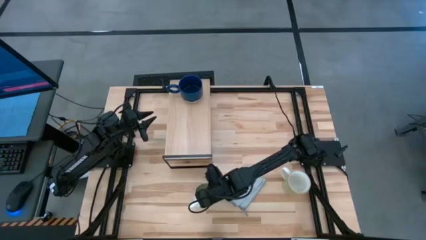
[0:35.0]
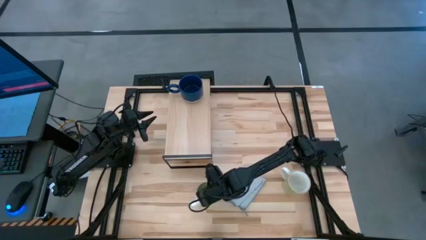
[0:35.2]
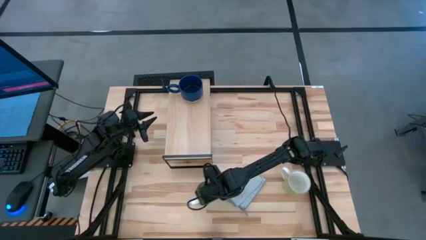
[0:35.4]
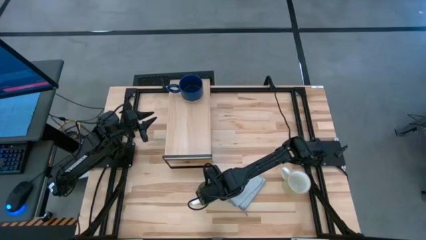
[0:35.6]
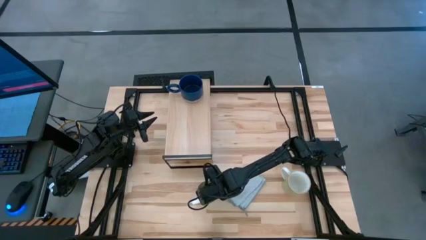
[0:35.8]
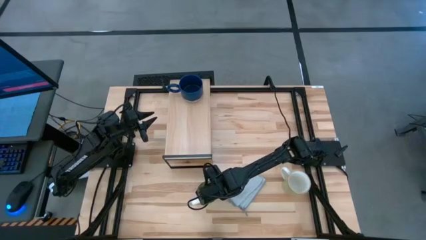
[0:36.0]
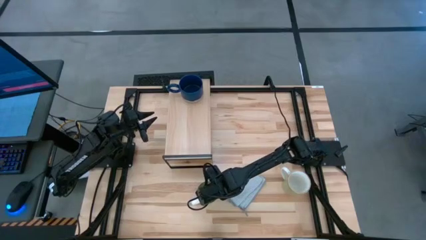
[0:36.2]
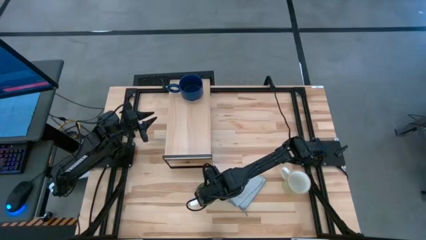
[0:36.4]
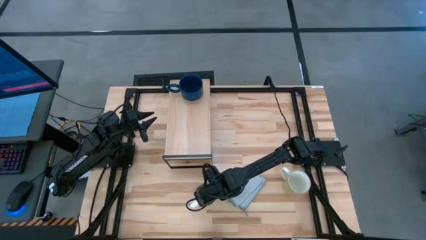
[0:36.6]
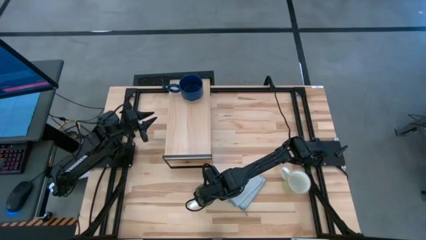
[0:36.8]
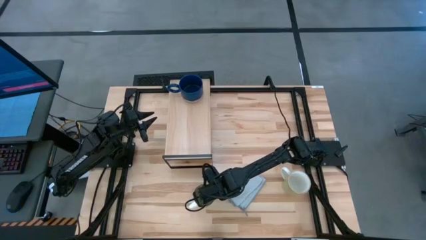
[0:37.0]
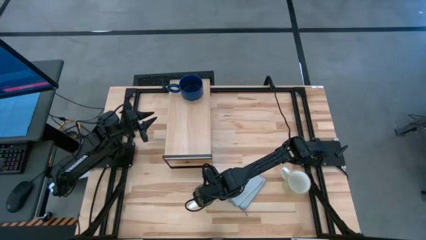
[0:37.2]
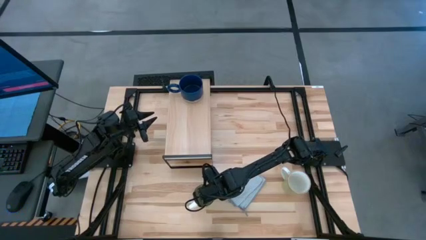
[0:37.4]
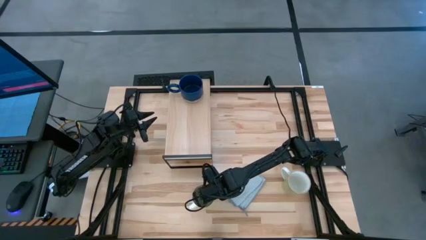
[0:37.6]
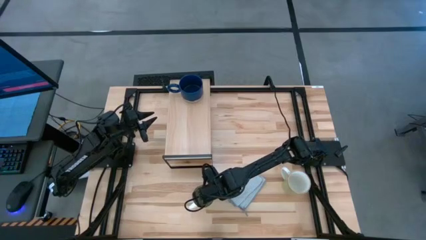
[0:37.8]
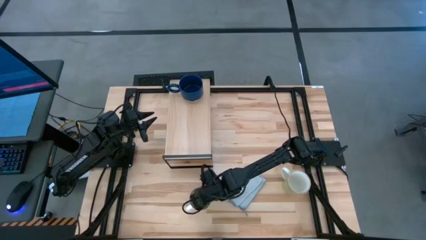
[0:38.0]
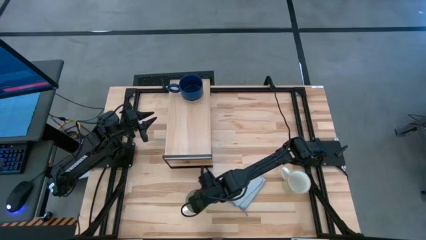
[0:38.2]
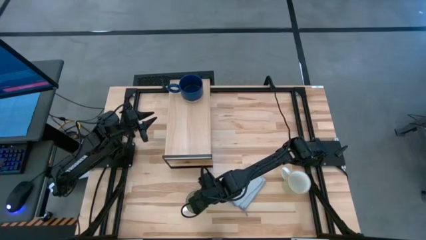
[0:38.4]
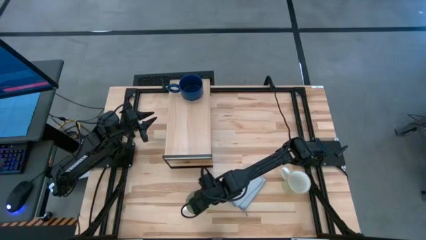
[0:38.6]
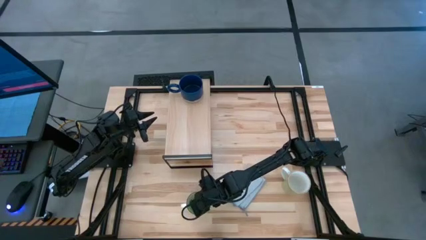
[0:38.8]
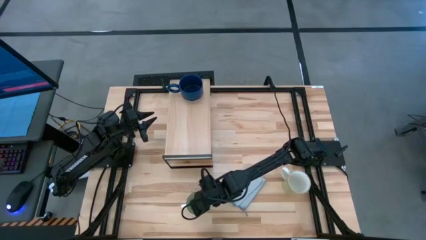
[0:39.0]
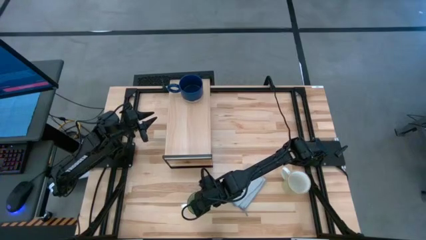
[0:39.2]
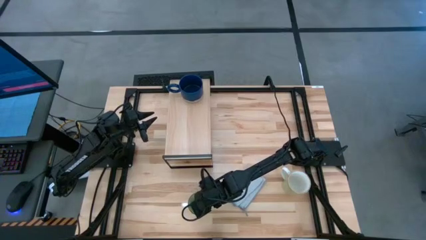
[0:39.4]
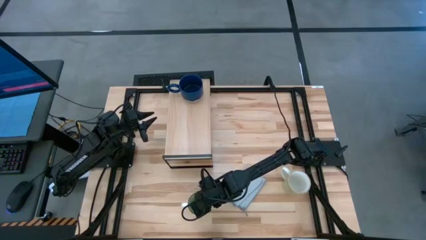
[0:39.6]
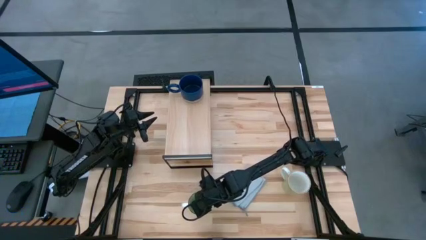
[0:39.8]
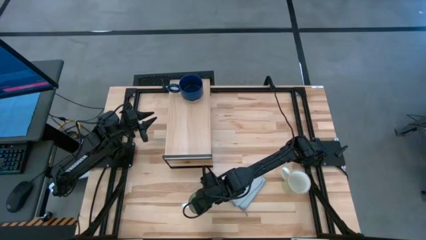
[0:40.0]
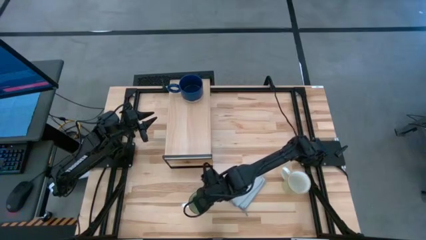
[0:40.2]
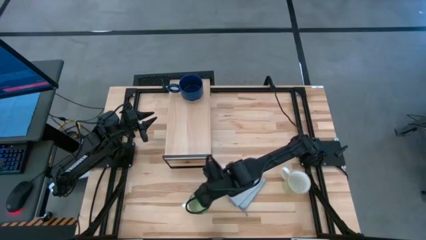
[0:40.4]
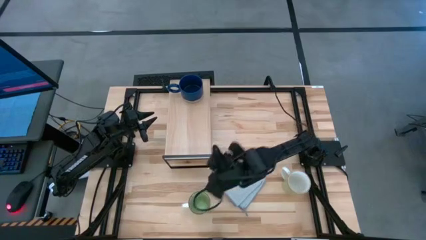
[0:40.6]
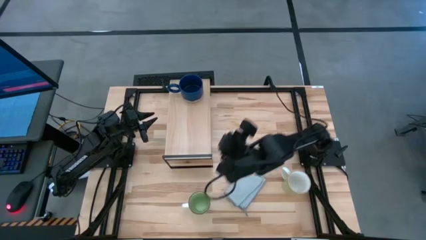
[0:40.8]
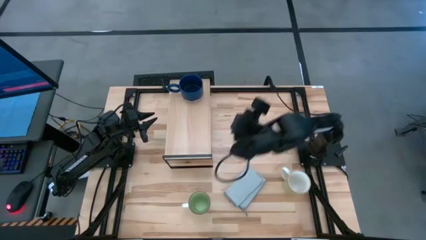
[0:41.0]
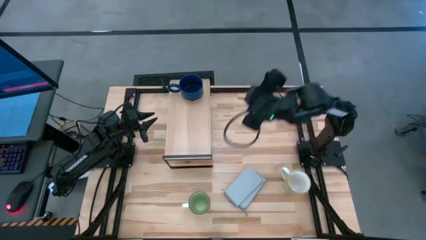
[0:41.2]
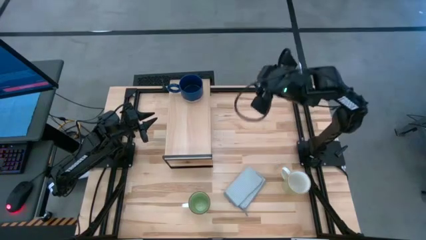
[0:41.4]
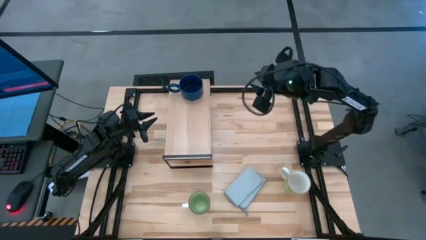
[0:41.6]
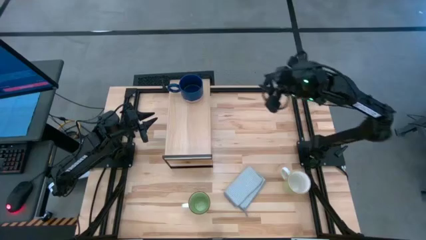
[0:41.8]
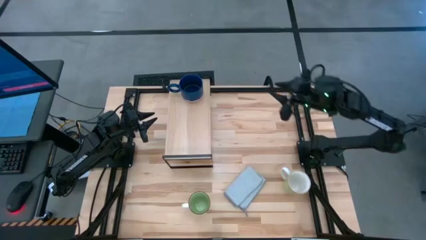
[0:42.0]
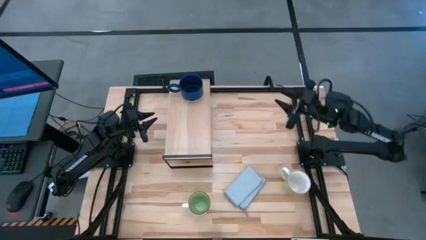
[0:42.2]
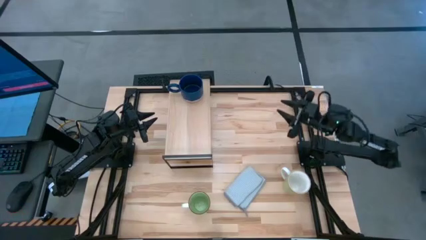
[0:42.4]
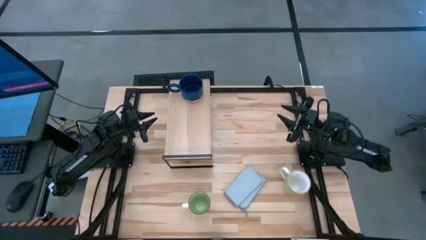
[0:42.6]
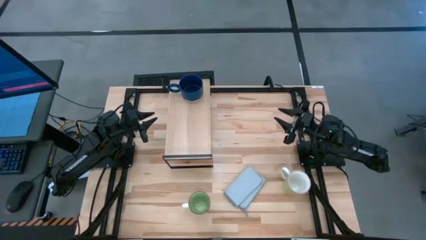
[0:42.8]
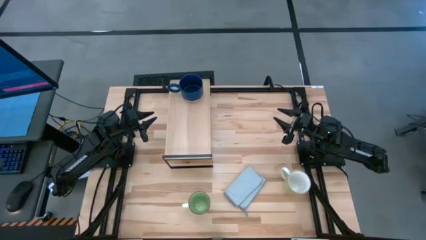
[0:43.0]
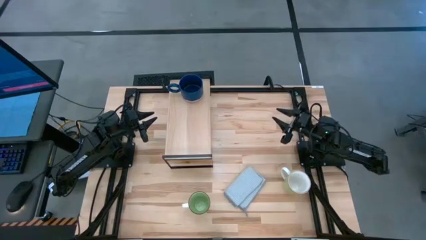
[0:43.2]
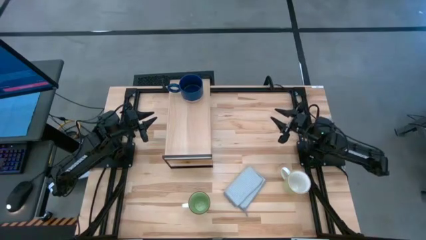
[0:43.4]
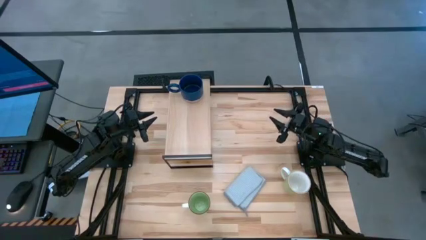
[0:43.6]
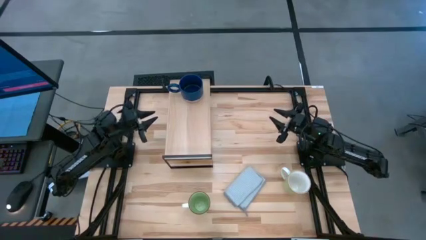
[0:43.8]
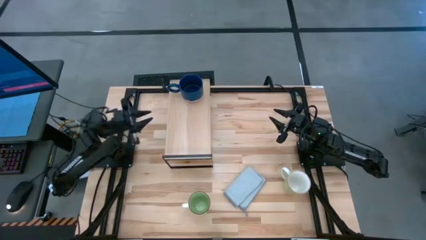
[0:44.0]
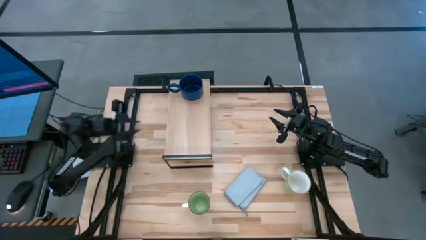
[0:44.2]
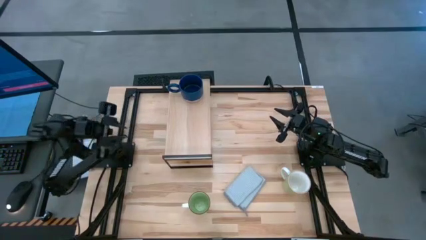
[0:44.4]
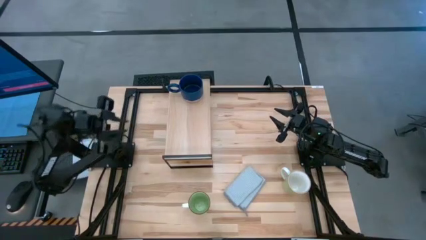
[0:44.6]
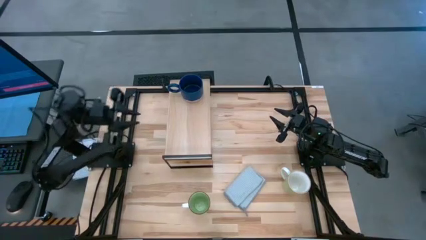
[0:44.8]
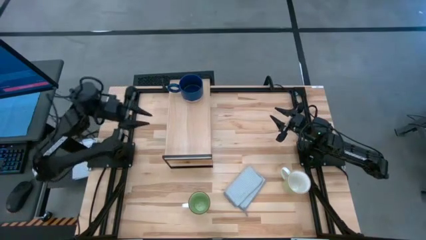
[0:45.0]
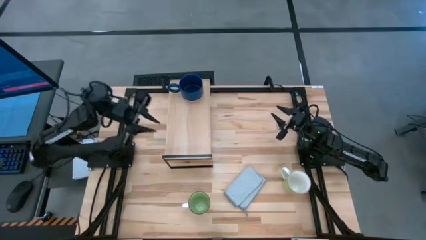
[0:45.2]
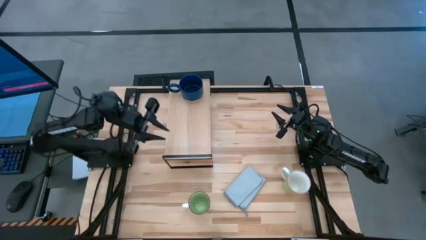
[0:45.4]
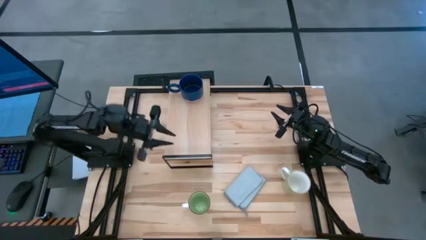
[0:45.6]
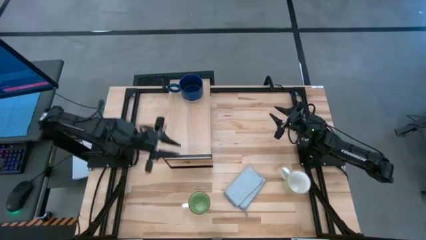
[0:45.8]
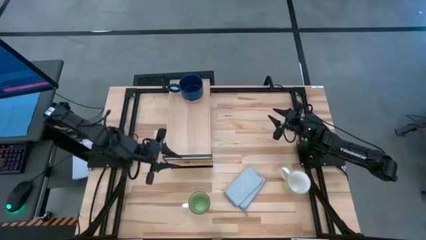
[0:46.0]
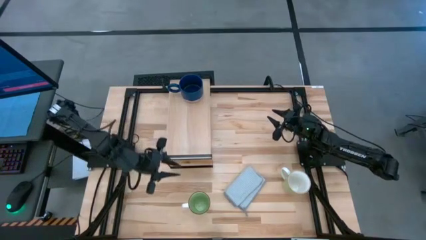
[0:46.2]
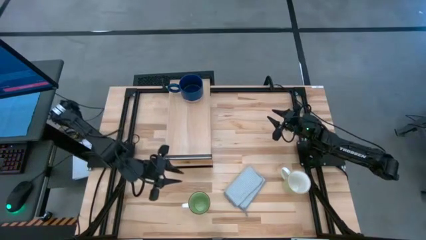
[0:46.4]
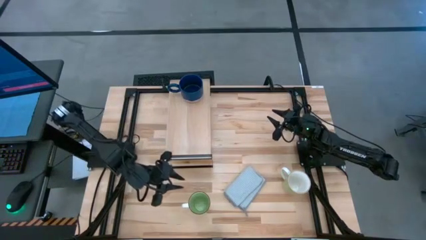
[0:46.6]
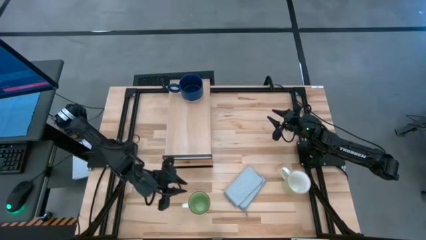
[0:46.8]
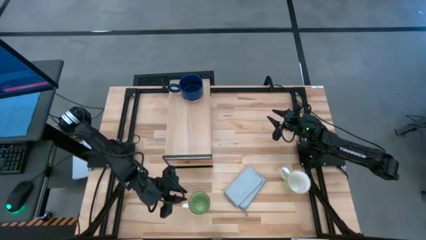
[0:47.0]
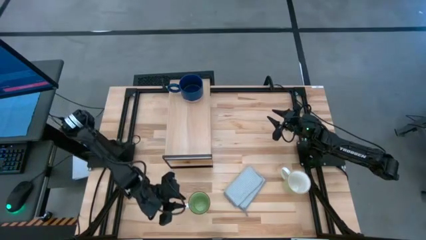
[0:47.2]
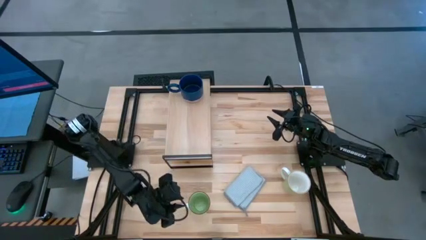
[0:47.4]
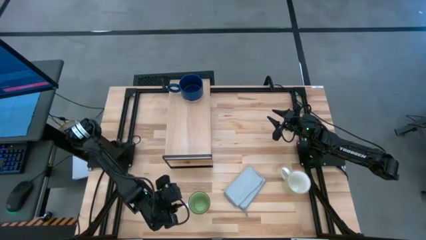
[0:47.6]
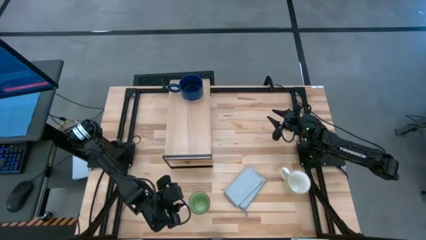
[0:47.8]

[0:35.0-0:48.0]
Task: Stack small to large cups/mugs on shelf
Put the white green mug on the shelf

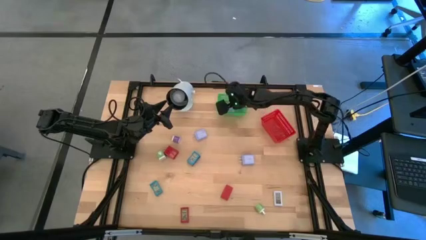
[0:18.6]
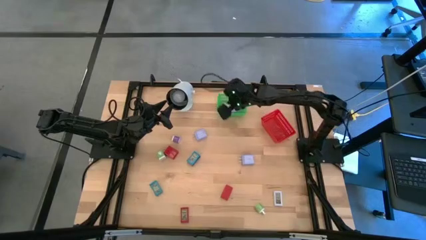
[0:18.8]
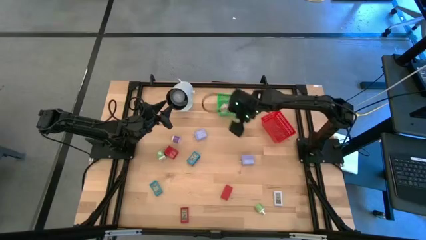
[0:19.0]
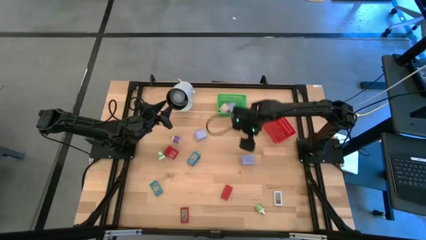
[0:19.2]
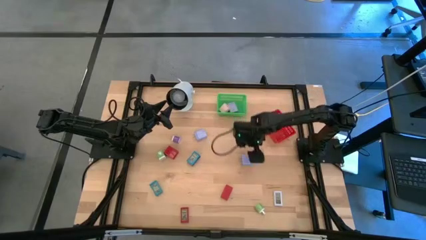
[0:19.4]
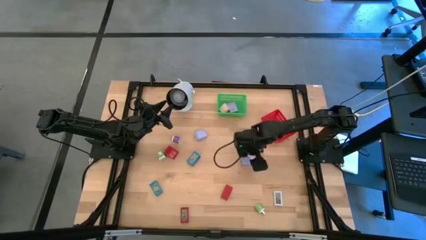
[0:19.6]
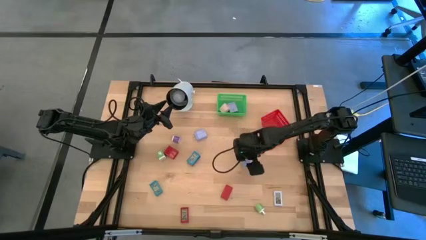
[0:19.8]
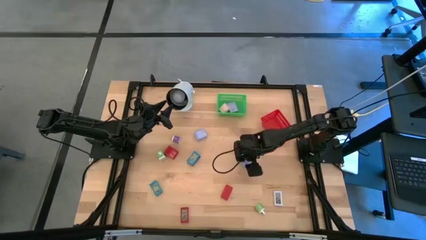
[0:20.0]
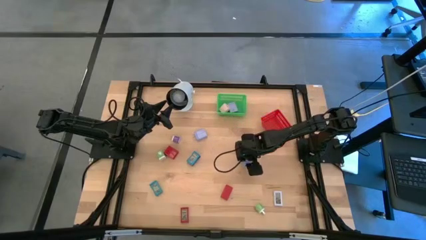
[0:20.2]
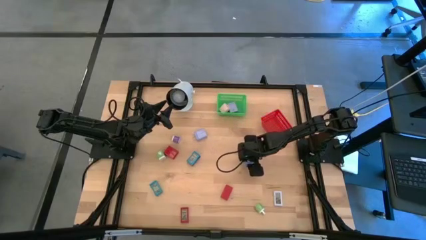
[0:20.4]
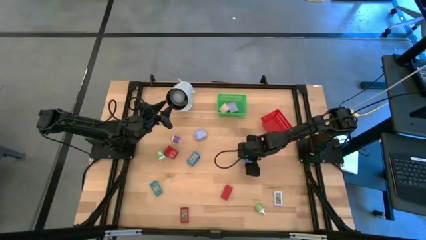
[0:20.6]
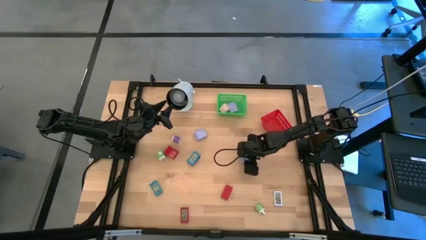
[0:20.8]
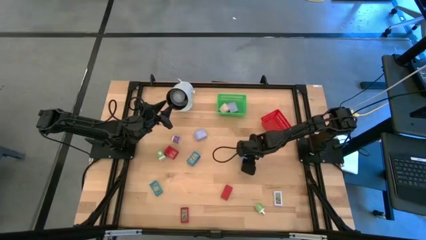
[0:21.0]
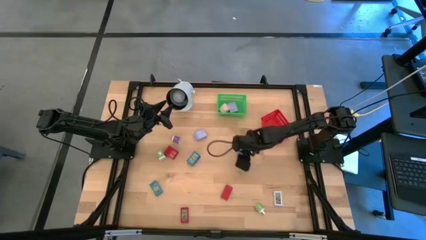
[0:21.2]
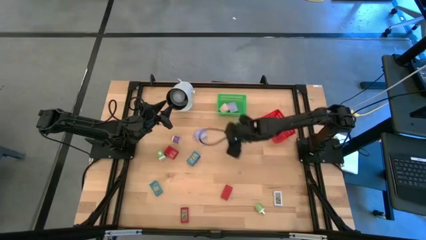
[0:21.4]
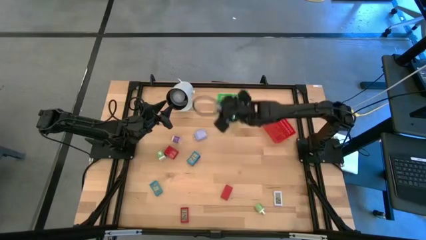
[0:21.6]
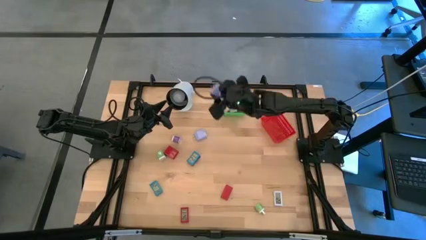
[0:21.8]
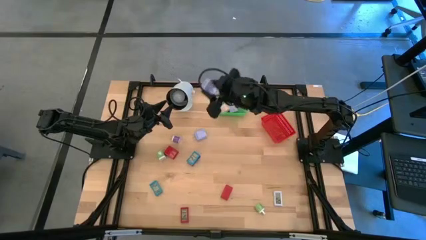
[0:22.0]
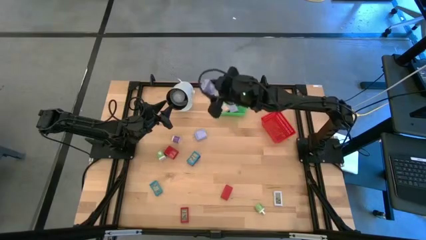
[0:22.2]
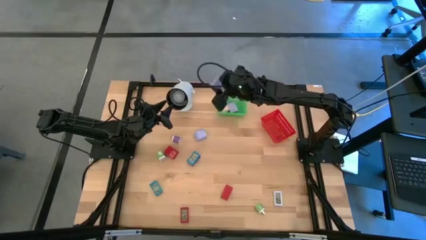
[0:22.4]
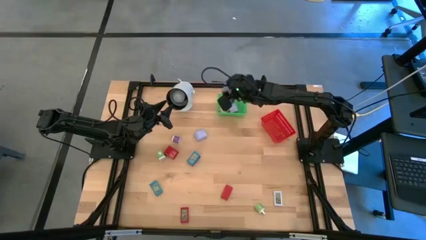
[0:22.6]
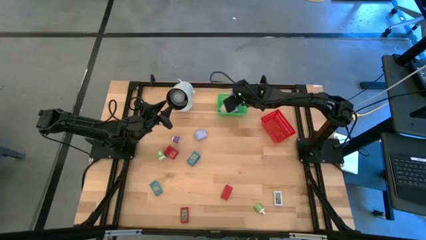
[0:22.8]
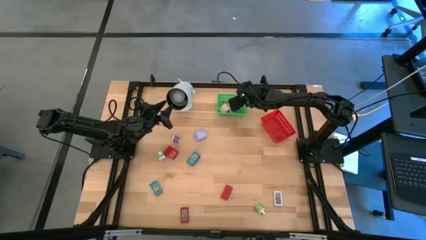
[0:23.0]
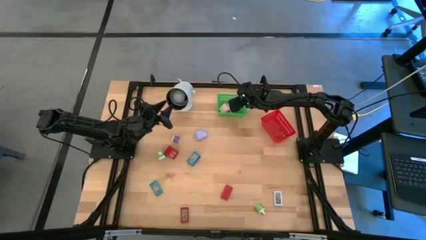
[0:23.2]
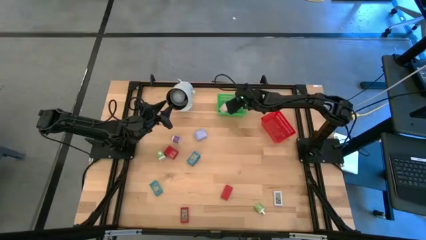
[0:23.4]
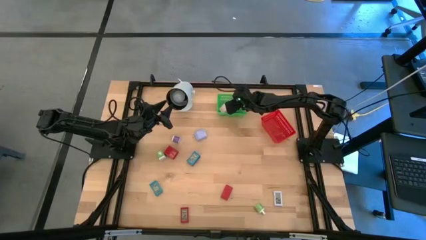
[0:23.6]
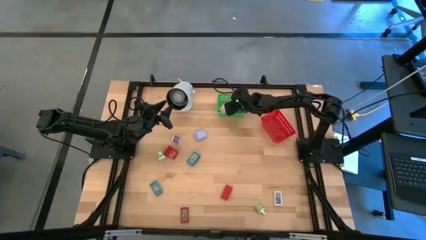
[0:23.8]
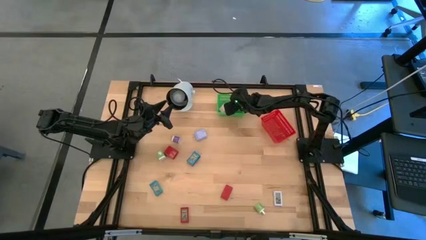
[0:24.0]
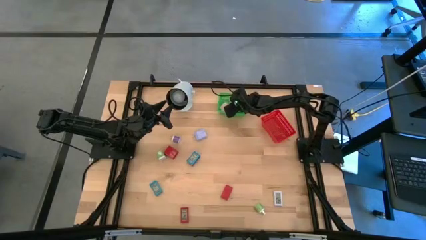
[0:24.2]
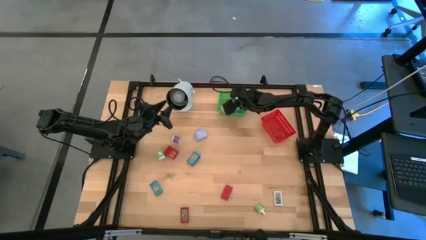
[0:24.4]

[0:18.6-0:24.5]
Task: Pick & Place Office items
Put the bottom light blue charger adapter into the green bin
